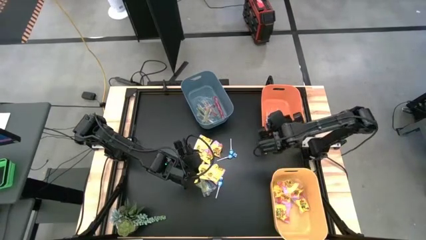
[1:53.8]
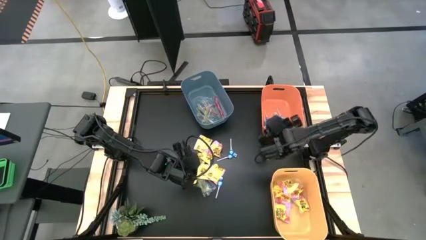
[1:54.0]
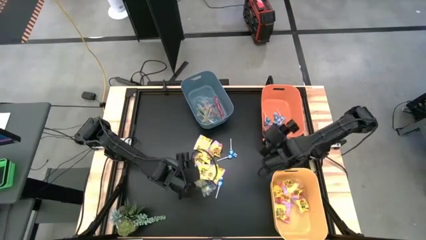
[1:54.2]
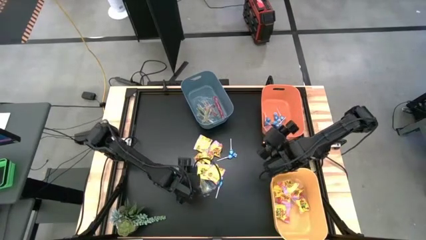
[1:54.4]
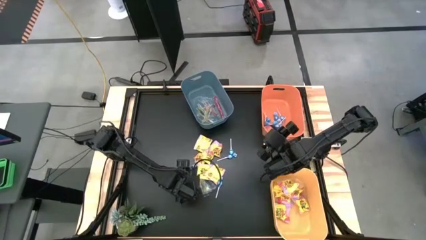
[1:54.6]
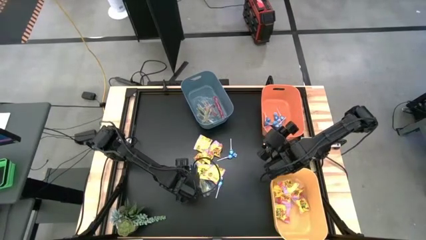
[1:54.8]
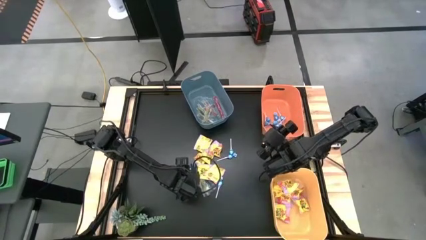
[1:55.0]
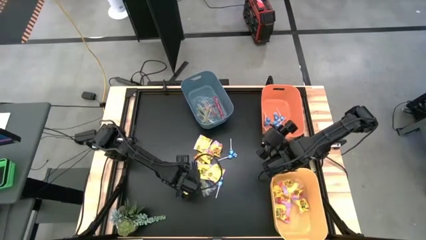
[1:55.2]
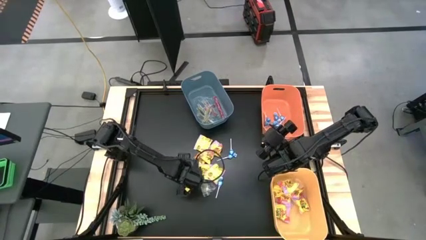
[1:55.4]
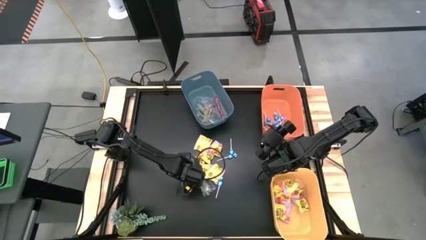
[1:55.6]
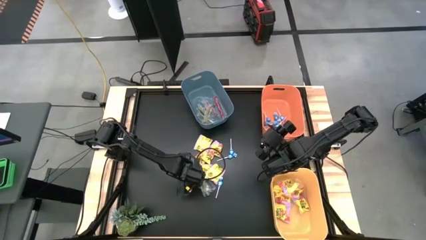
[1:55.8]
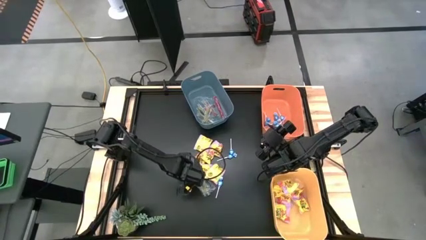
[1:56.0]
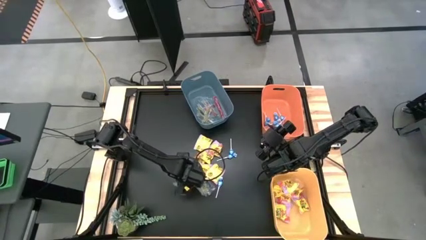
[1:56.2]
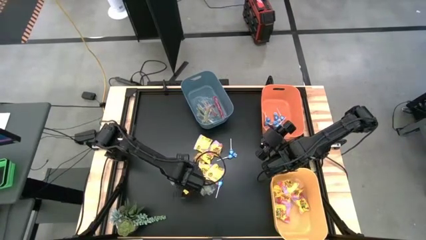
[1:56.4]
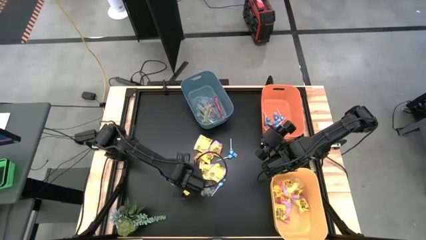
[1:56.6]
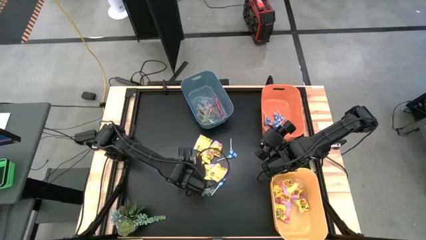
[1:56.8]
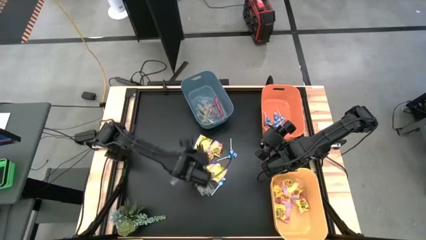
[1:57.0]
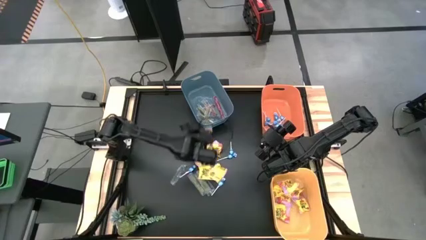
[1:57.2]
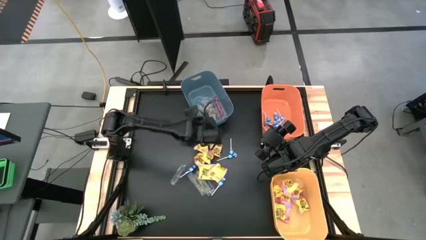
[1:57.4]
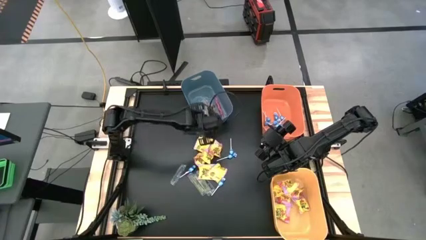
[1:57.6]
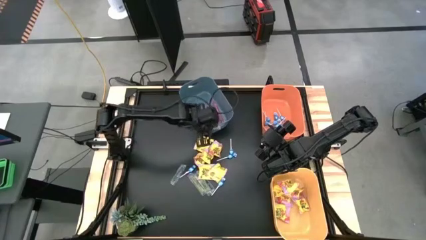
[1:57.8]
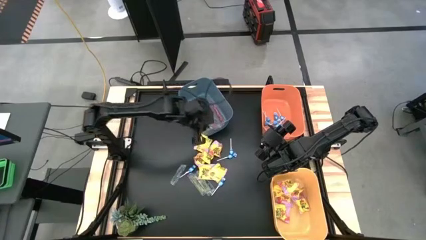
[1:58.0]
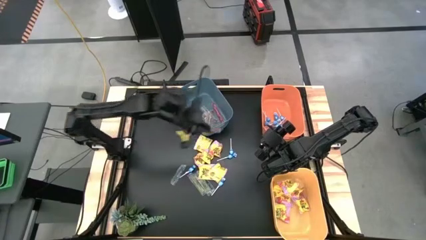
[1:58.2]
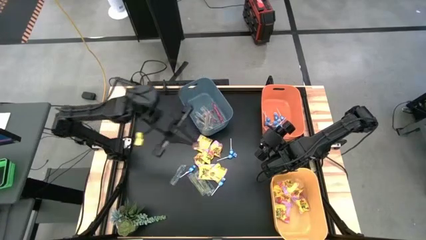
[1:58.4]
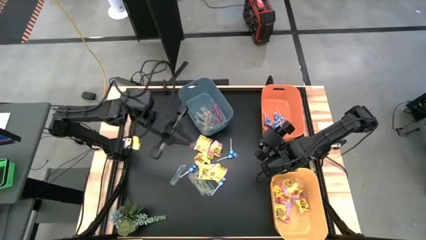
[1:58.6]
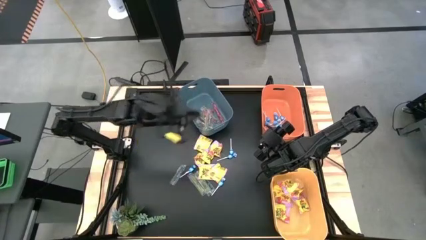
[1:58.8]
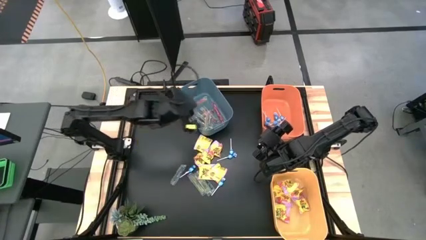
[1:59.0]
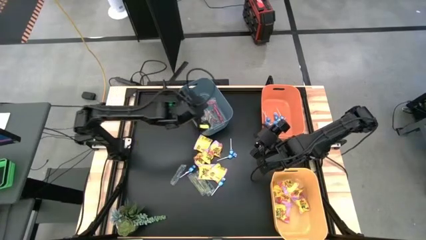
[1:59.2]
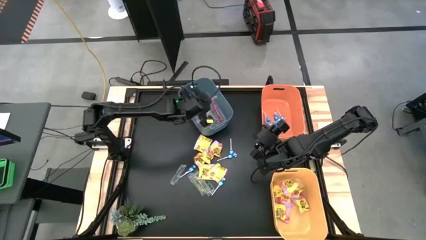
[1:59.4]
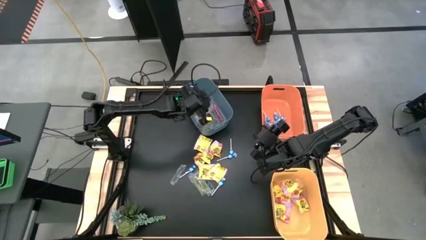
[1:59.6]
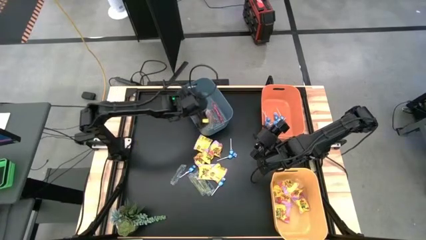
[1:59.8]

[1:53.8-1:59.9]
Task: Sort candy
Put the transparent candy into the blue bin

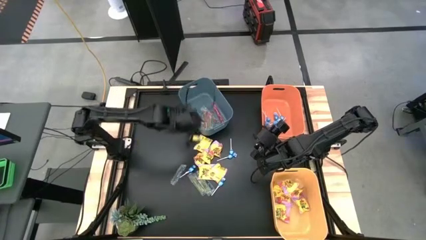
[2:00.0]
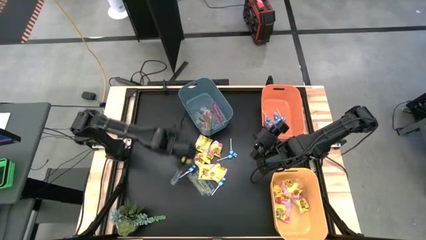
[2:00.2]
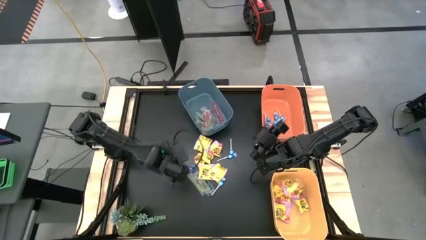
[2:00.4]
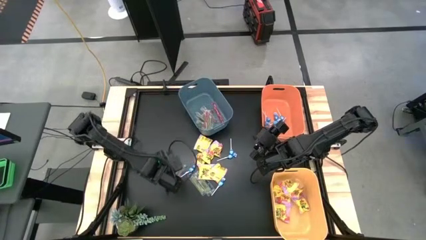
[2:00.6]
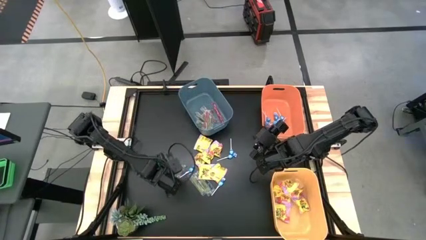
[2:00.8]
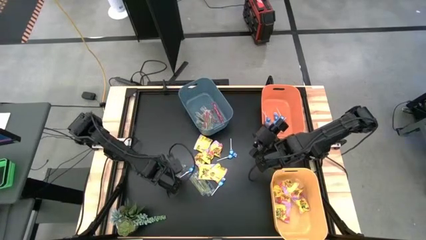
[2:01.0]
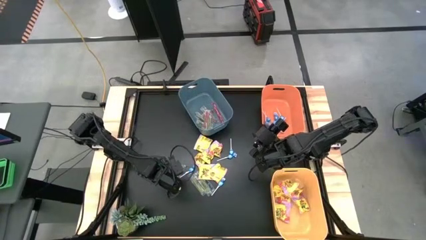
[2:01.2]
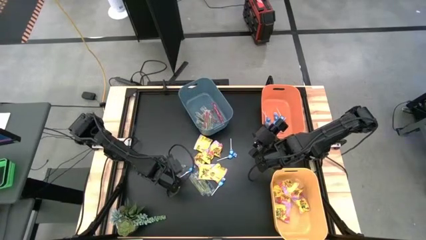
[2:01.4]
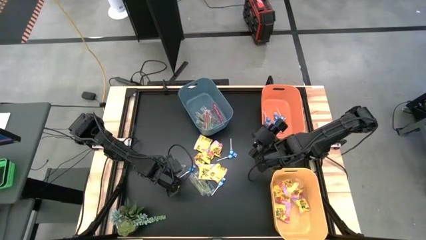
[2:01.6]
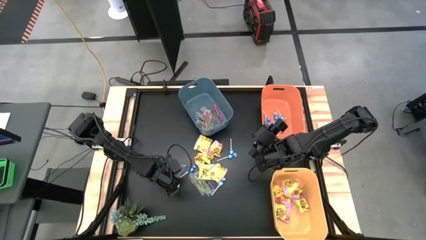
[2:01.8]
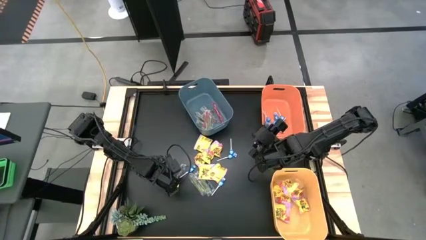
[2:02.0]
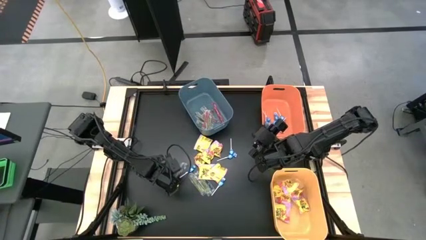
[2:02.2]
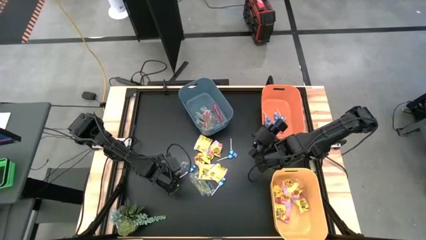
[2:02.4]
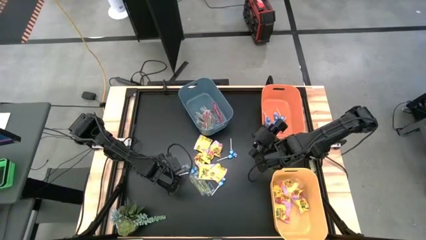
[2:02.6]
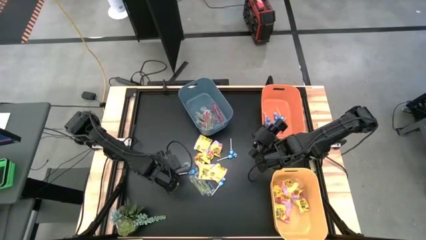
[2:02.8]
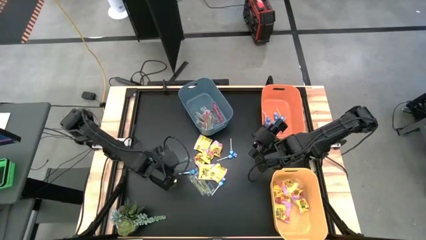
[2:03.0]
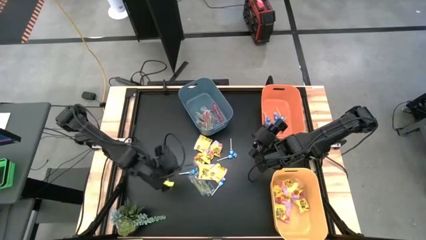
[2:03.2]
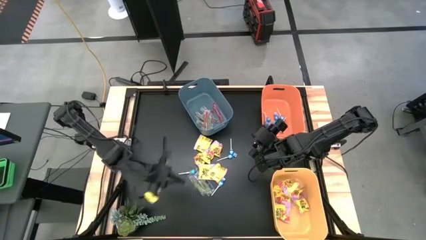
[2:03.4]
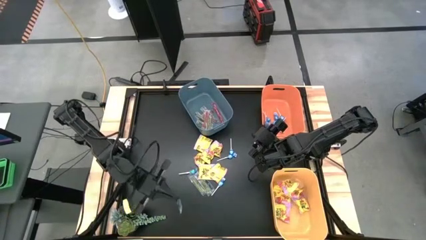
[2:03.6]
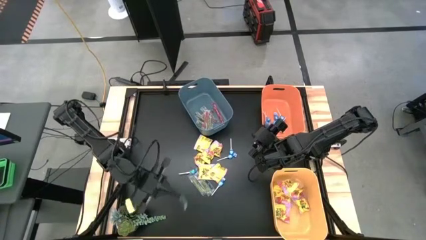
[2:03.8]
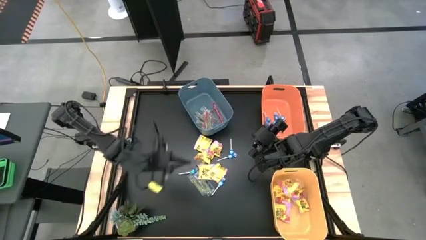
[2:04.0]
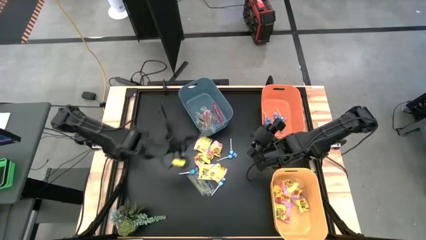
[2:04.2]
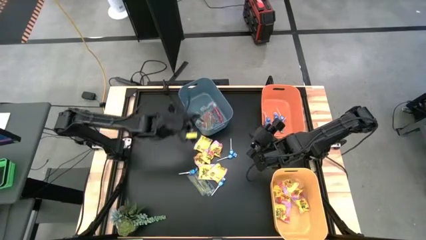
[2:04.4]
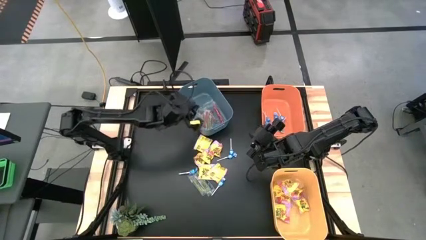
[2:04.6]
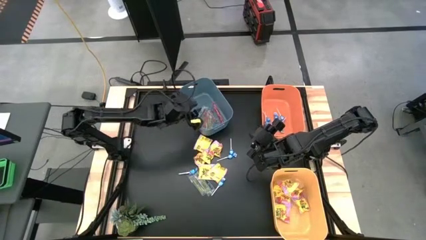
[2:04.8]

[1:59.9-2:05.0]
Put the transparent candy into the blue bin

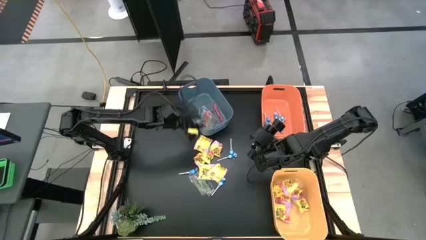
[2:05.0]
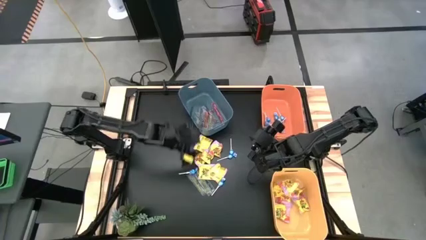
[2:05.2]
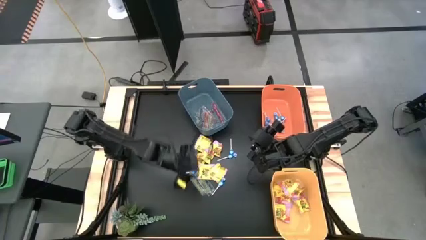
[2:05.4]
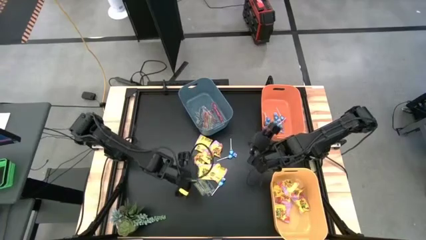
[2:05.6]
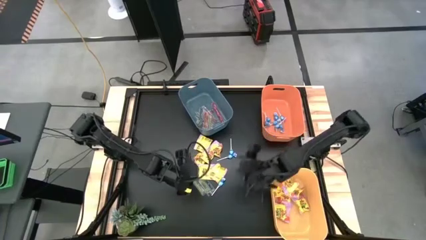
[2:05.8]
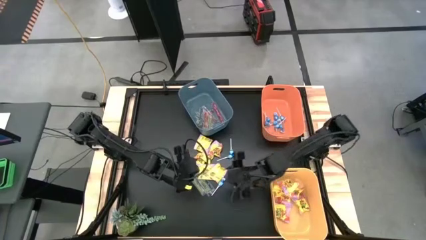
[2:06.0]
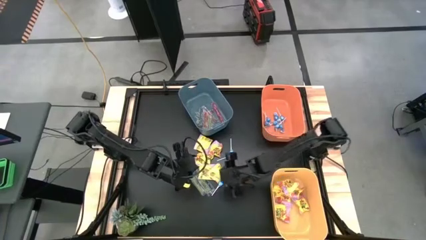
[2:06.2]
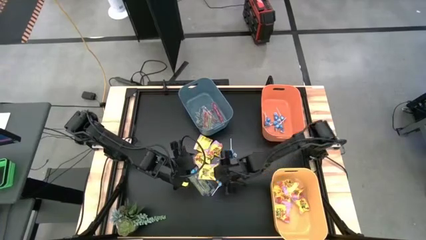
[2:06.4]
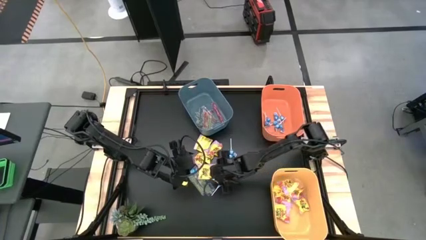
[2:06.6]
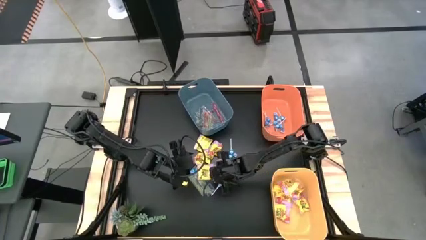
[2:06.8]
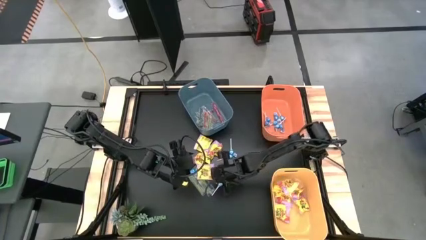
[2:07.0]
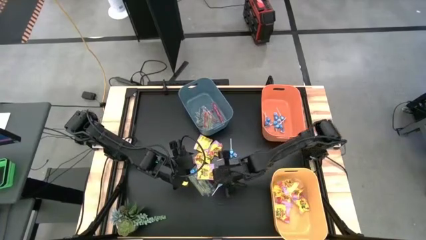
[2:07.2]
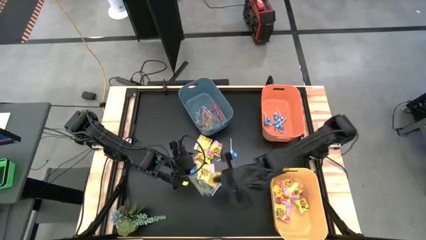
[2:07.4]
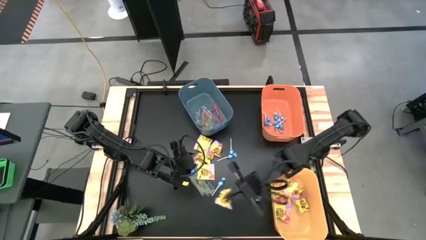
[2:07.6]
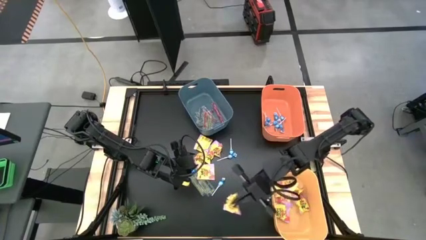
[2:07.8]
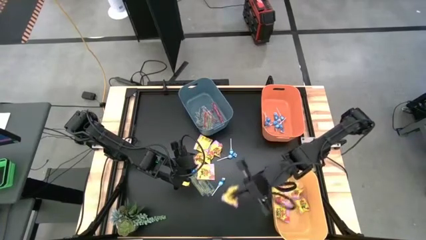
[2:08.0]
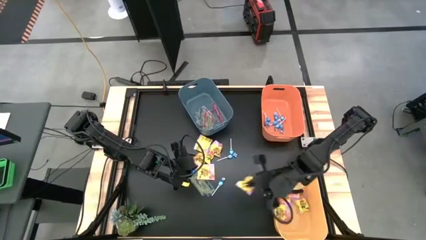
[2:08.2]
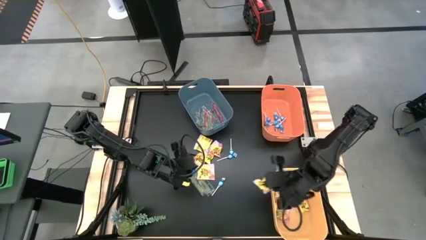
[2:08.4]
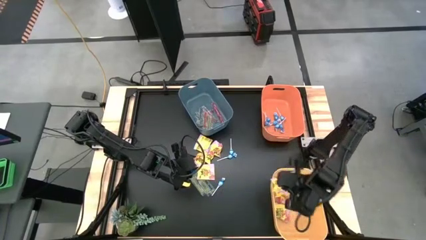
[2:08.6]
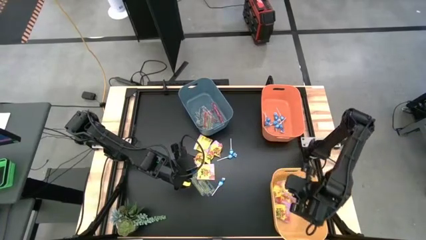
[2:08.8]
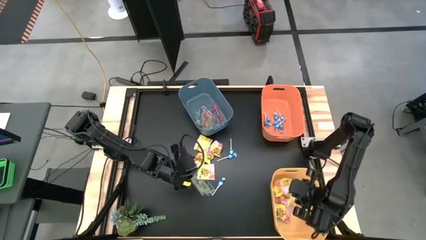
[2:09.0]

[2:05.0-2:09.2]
Put the yellow candy into the yellow bin
